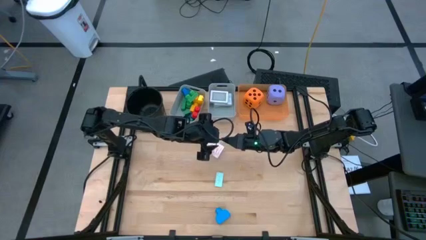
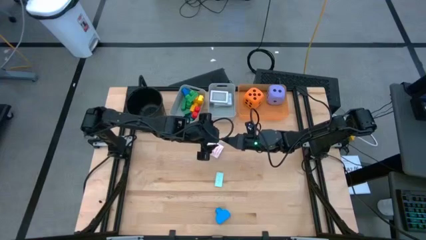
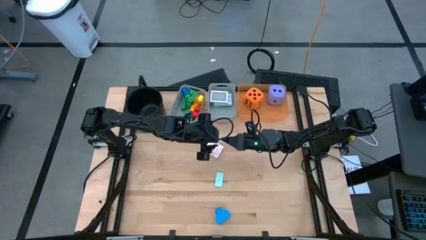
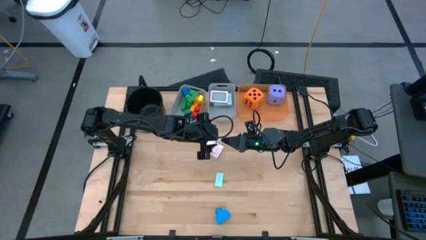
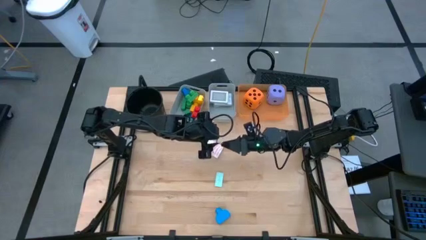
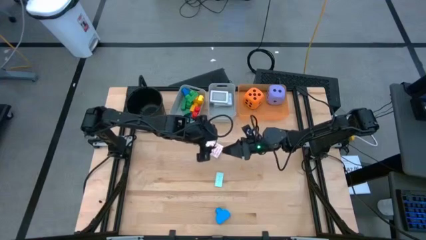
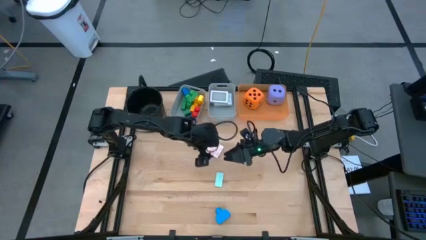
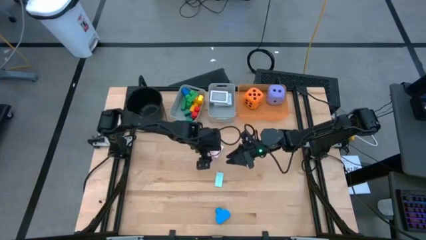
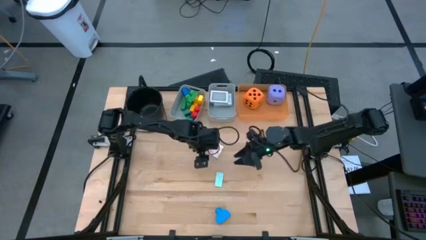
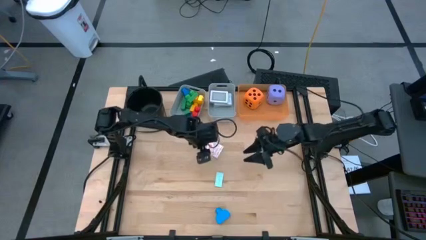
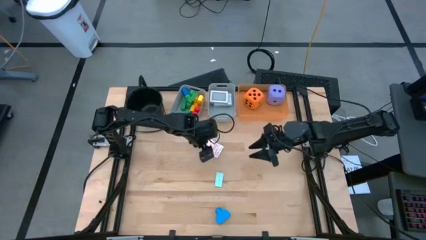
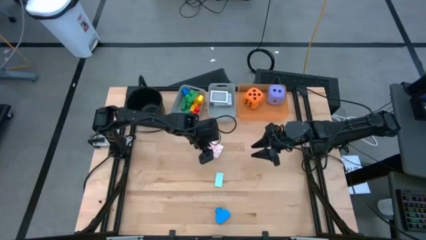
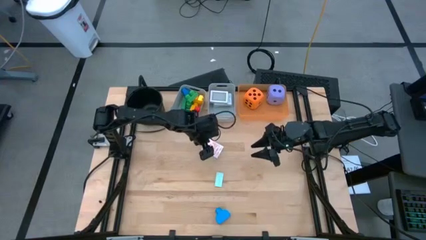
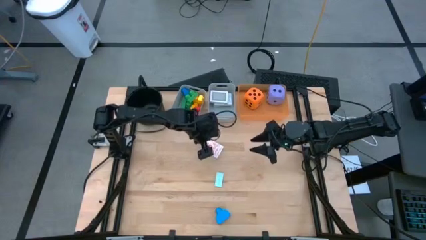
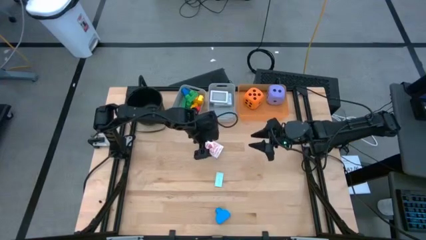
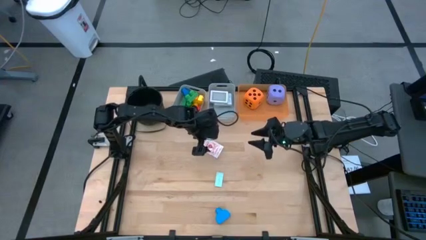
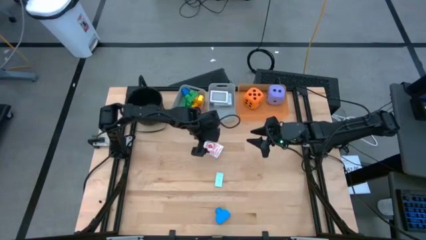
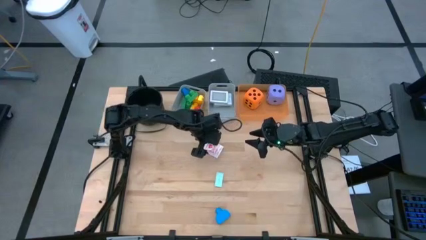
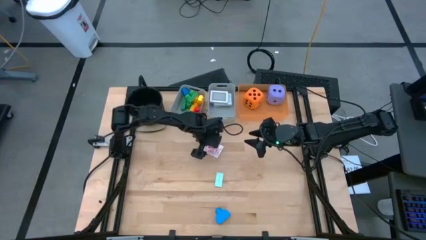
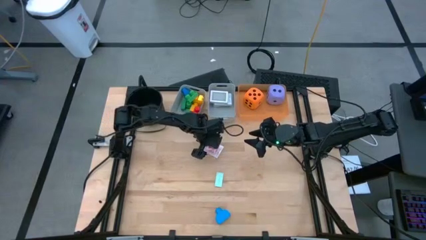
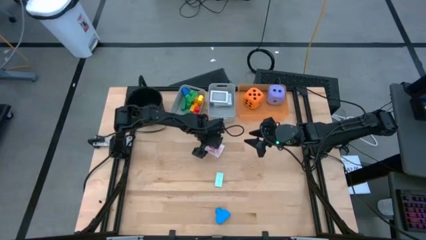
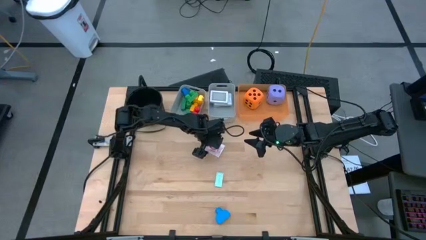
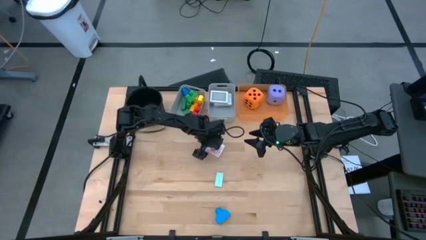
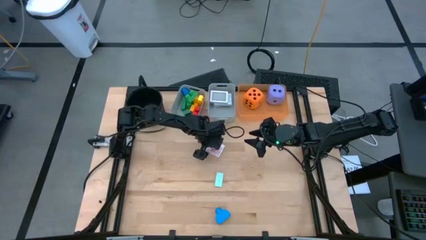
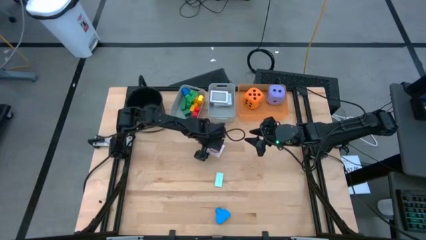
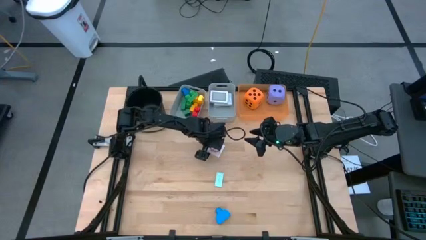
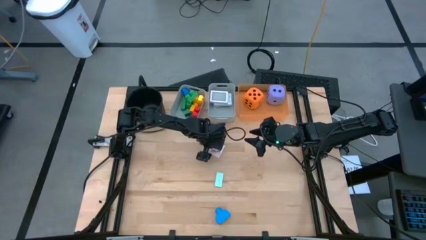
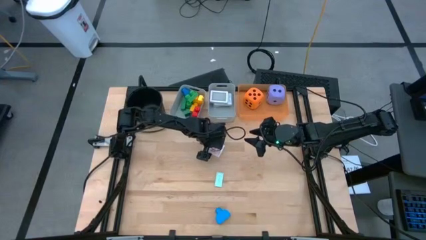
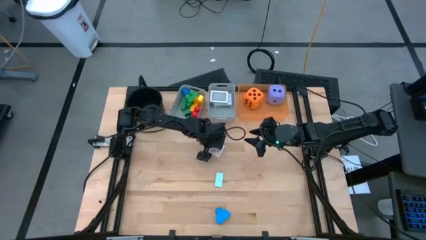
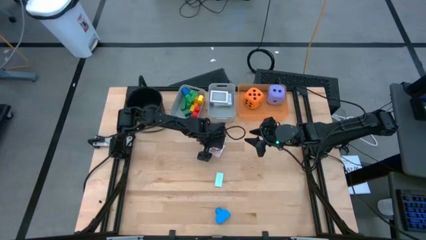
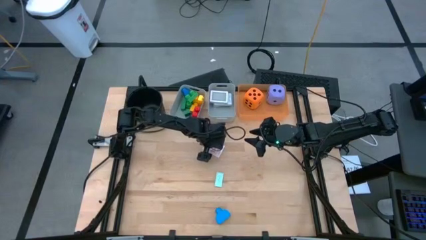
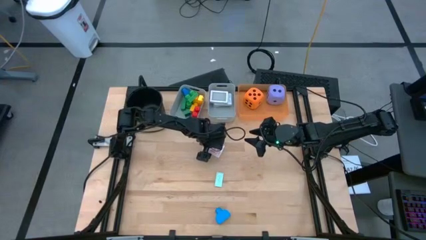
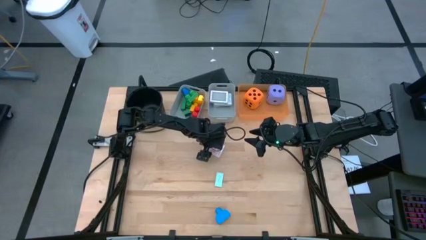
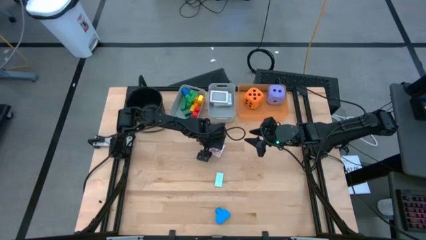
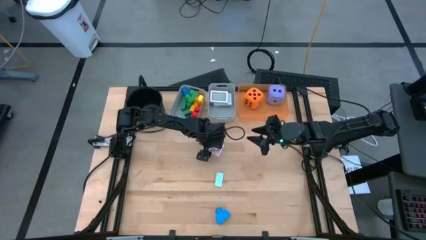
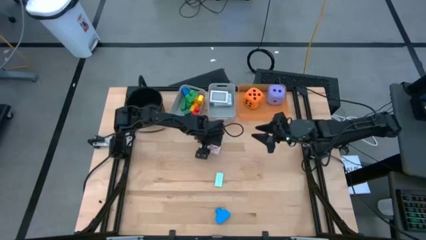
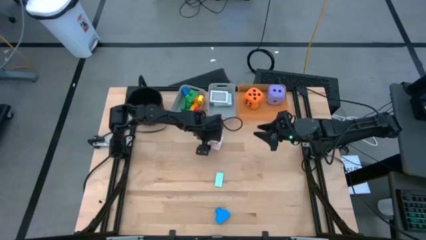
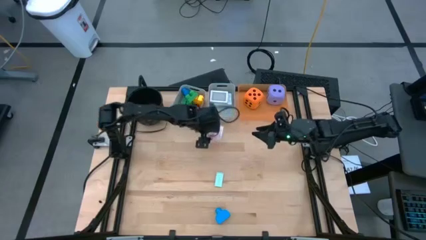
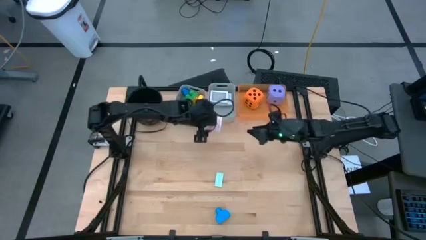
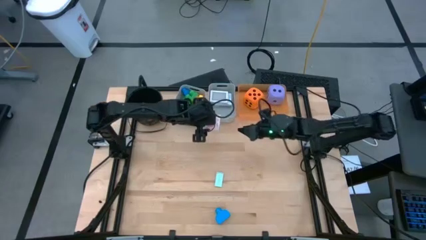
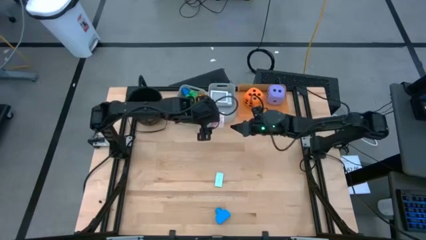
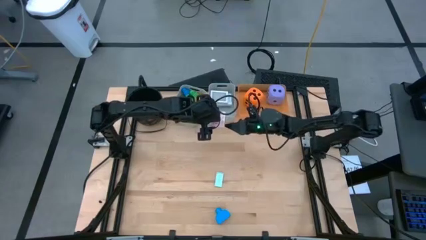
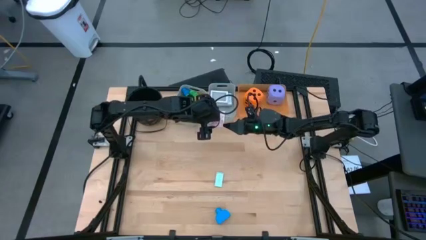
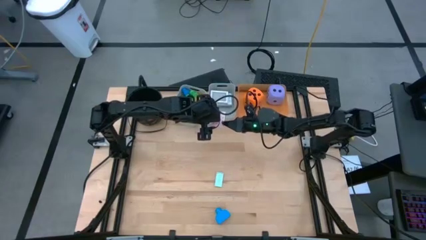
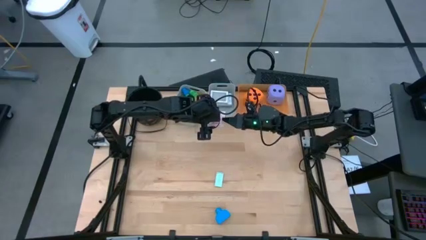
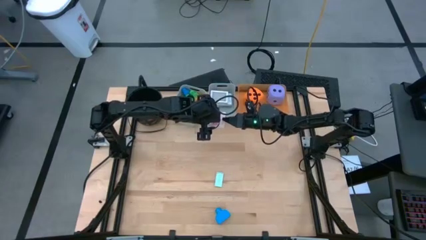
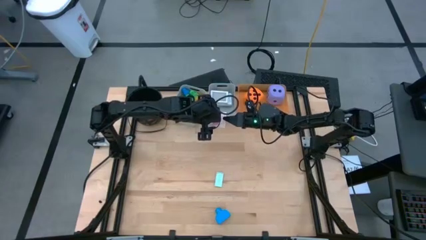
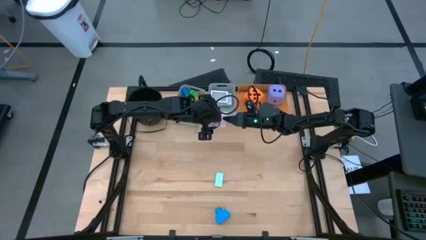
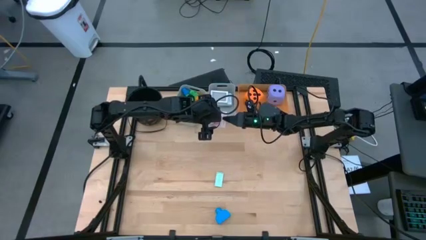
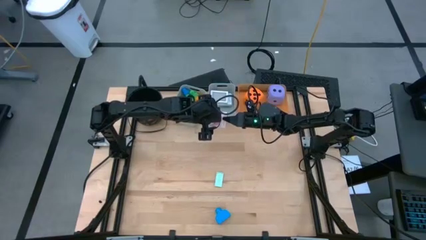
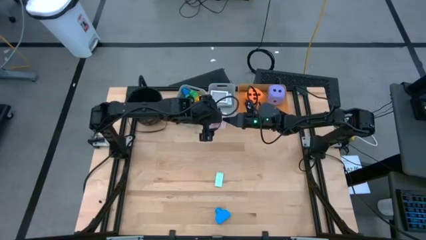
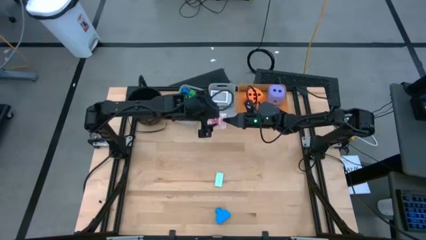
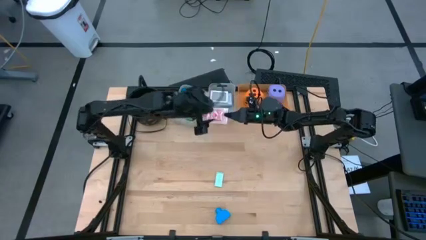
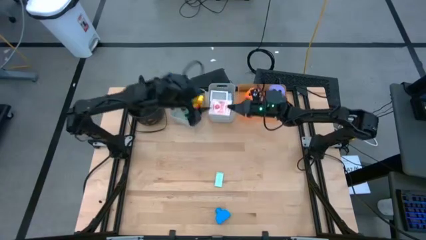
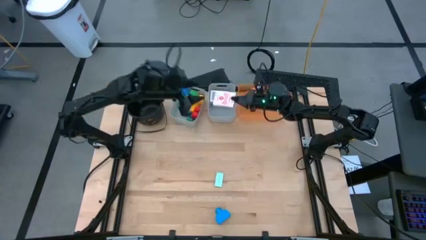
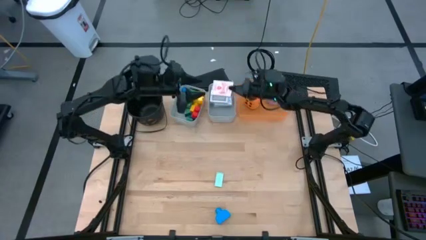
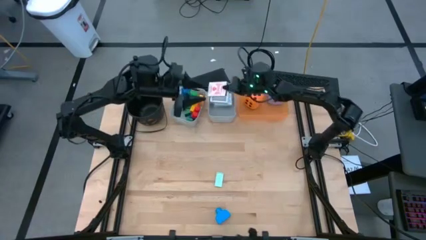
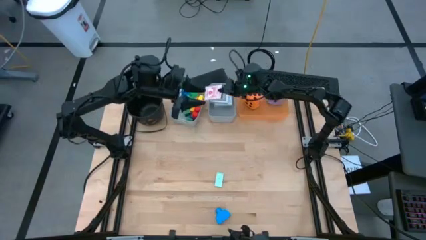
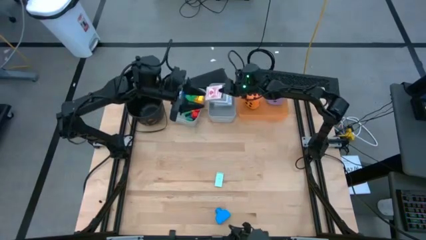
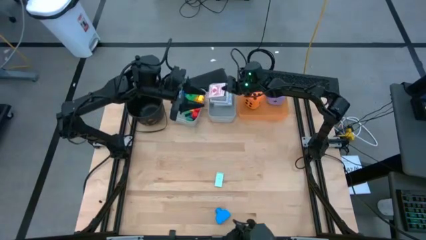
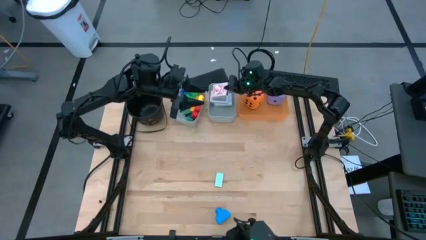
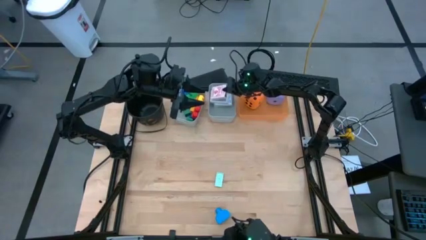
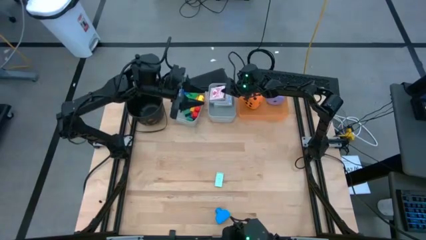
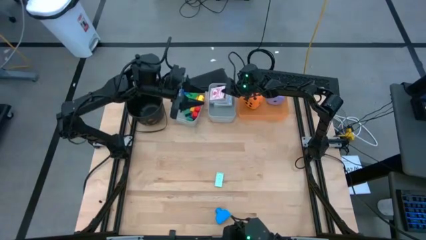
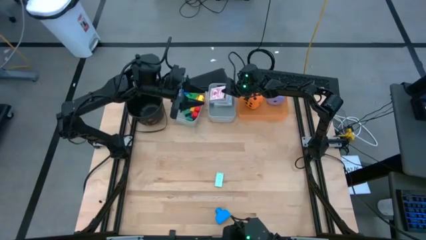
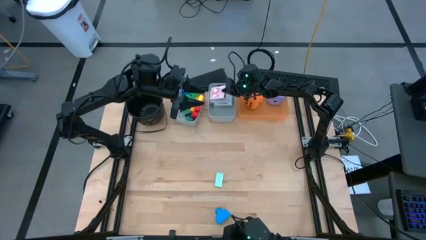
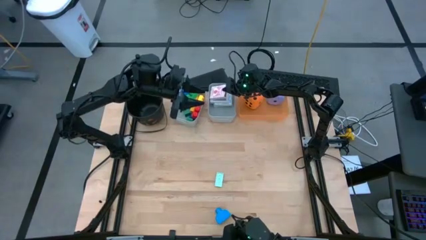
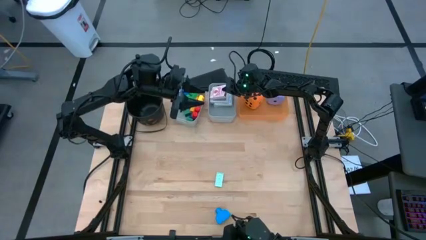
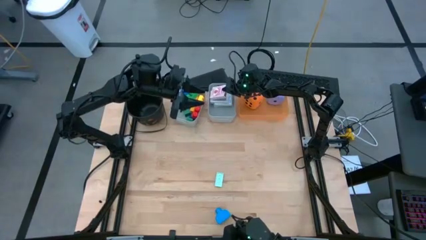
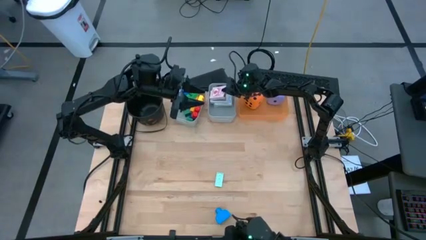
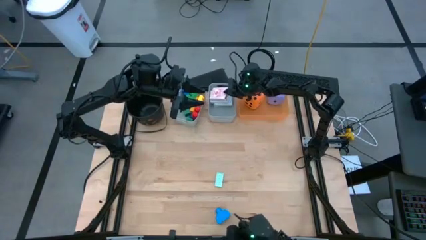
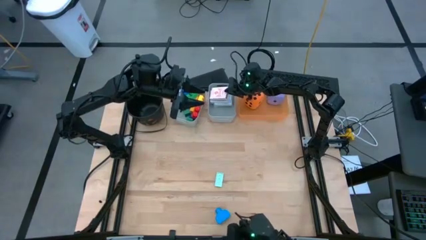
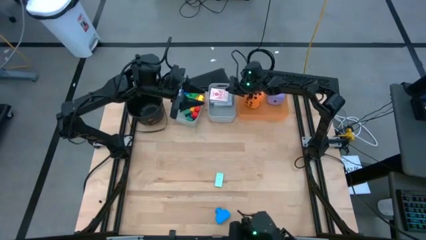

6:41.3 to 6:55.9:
Task: Pick & Place Toys
Put the red deck of cards into the right gray bin
